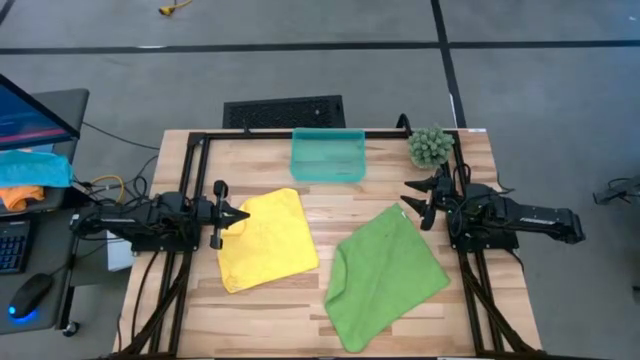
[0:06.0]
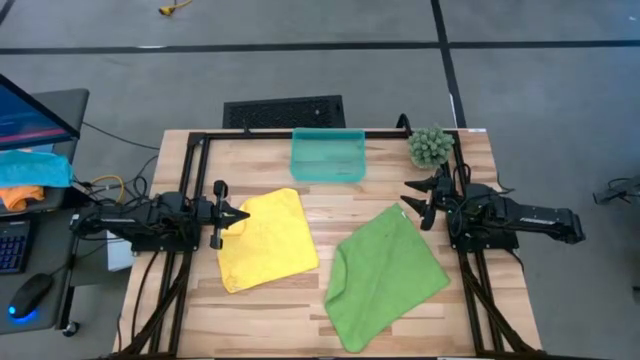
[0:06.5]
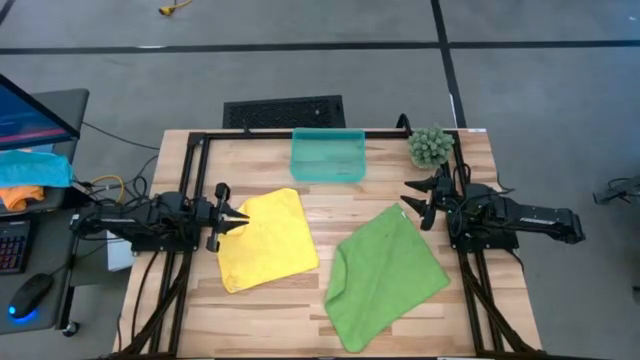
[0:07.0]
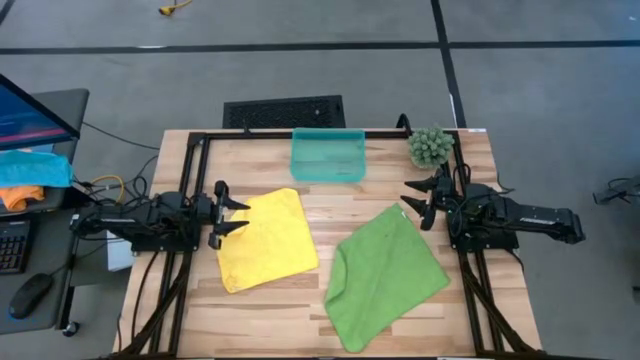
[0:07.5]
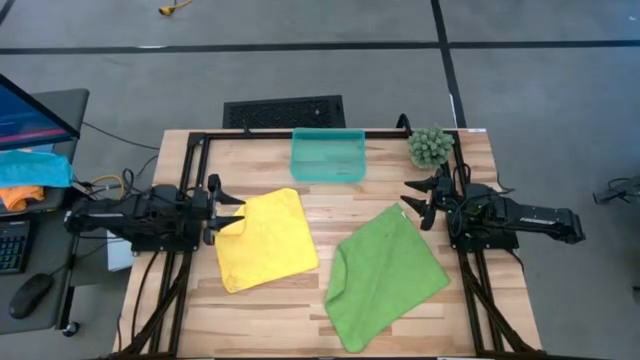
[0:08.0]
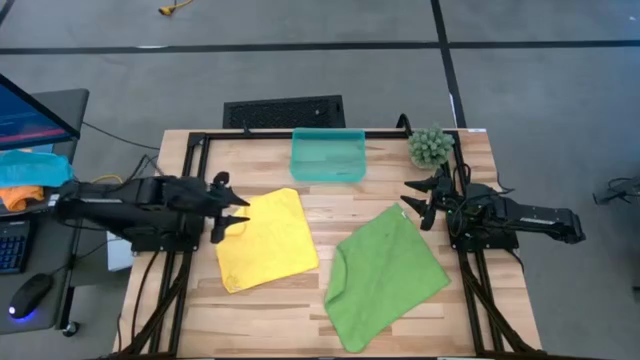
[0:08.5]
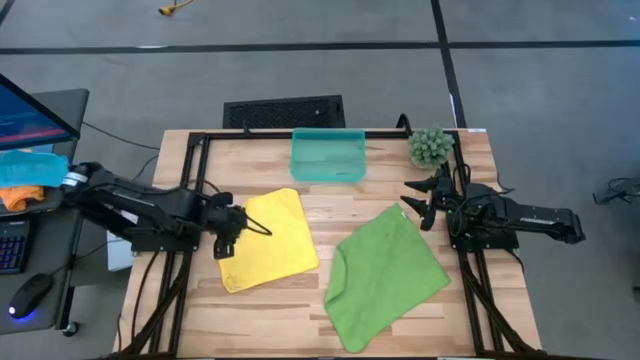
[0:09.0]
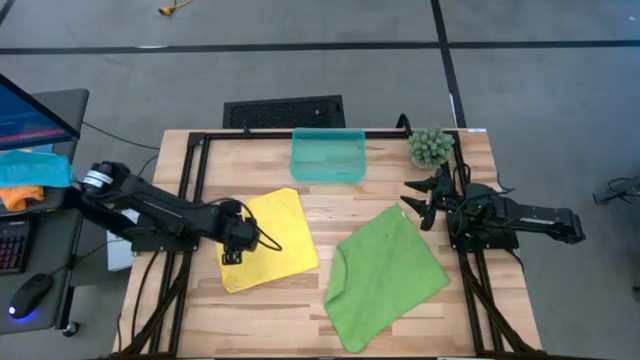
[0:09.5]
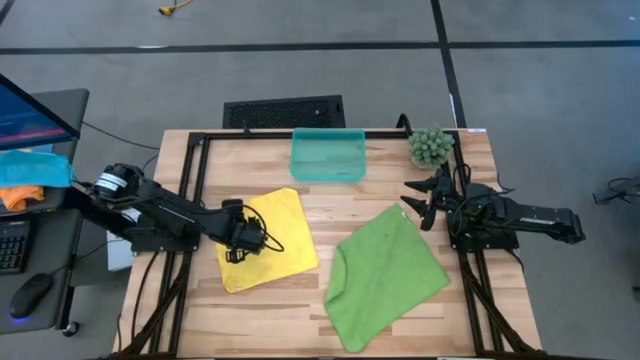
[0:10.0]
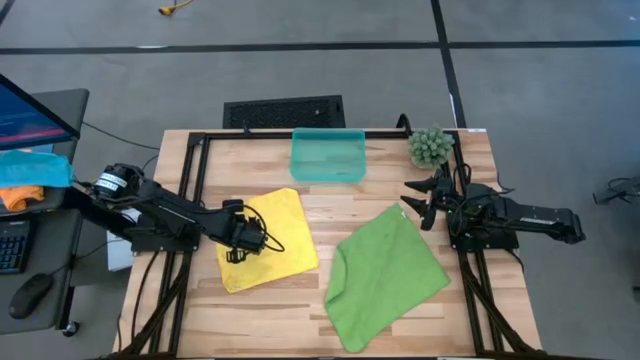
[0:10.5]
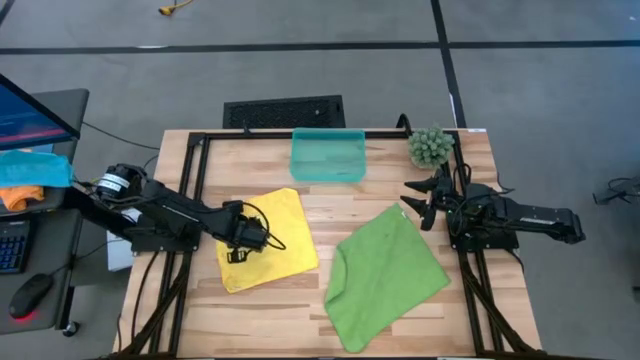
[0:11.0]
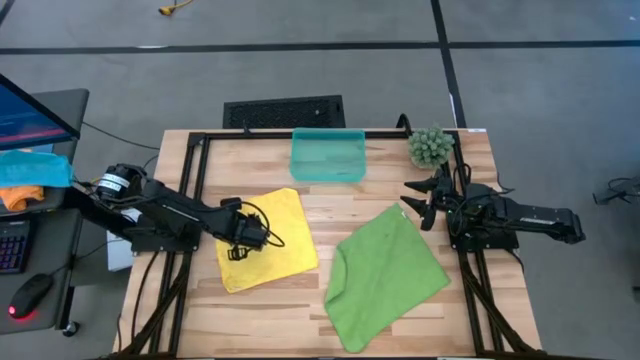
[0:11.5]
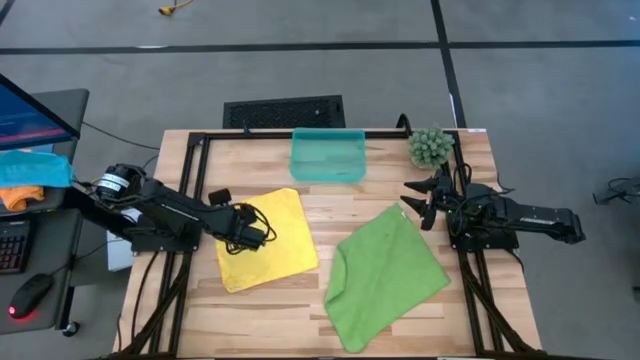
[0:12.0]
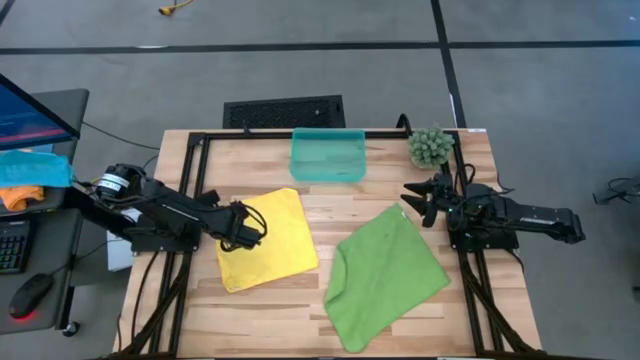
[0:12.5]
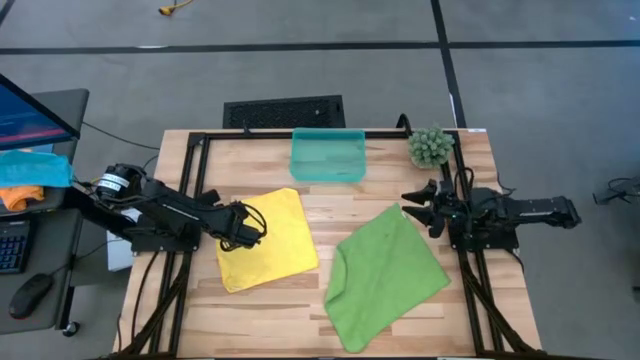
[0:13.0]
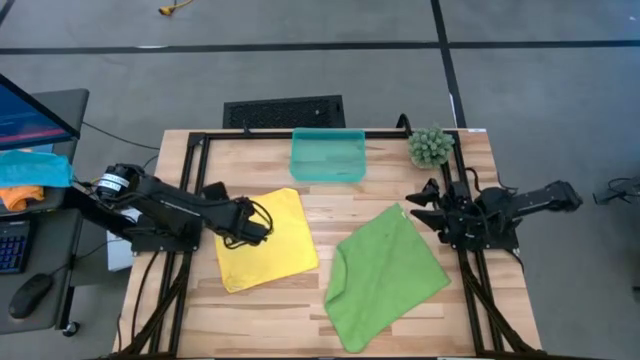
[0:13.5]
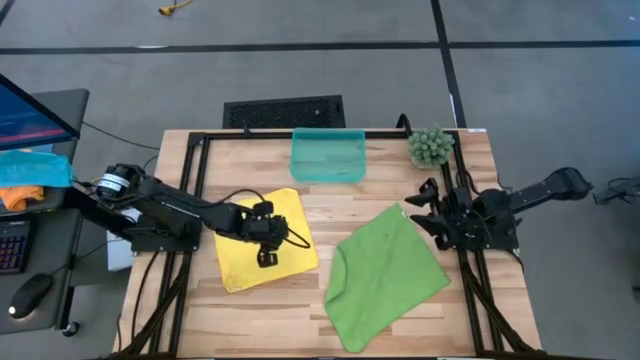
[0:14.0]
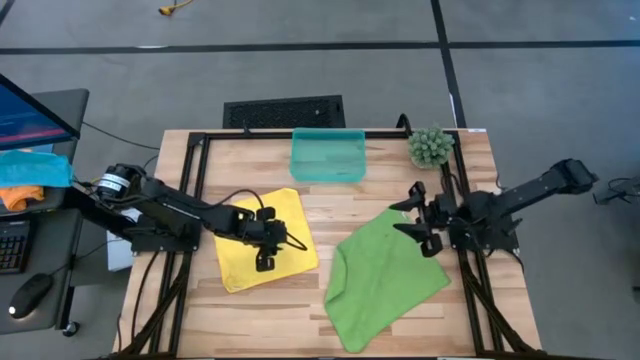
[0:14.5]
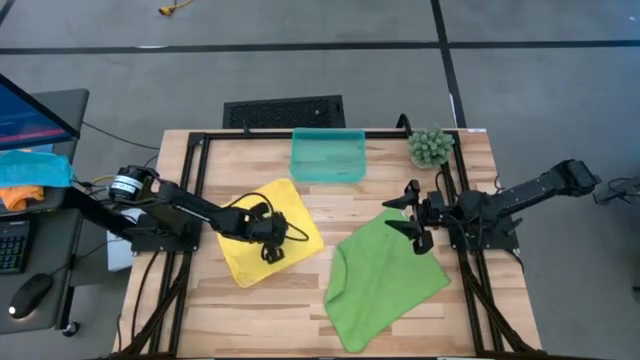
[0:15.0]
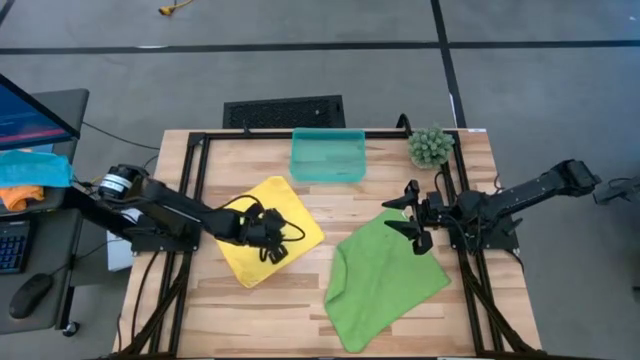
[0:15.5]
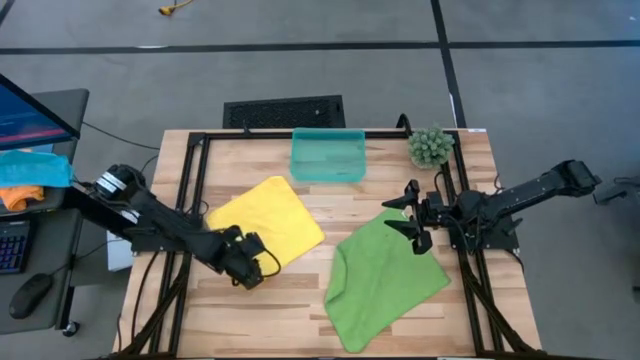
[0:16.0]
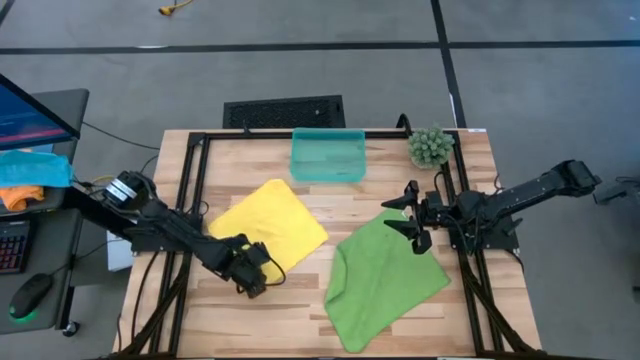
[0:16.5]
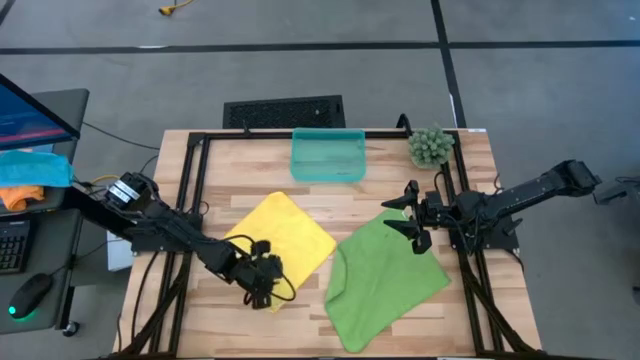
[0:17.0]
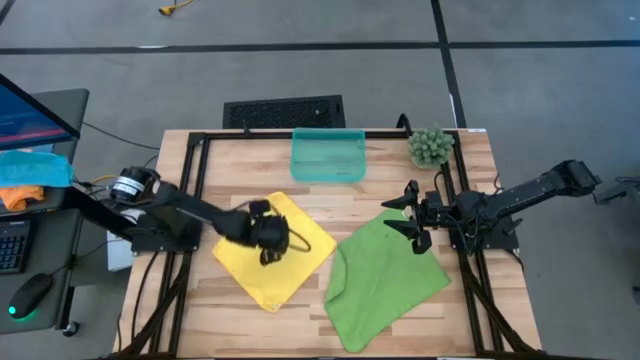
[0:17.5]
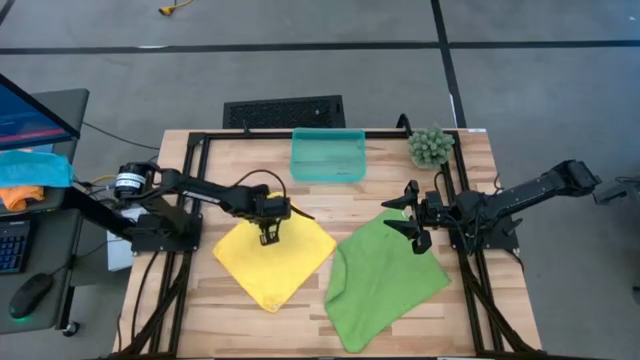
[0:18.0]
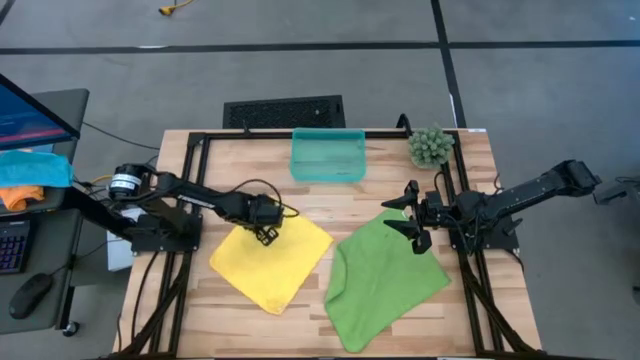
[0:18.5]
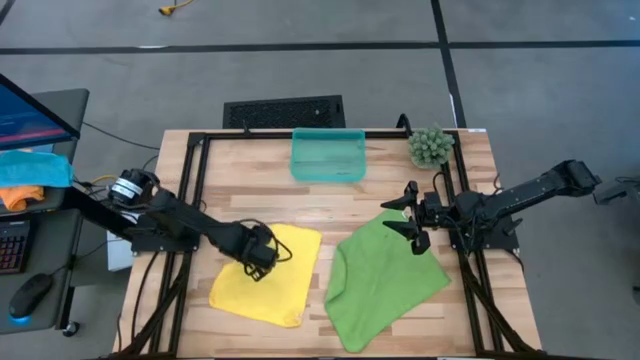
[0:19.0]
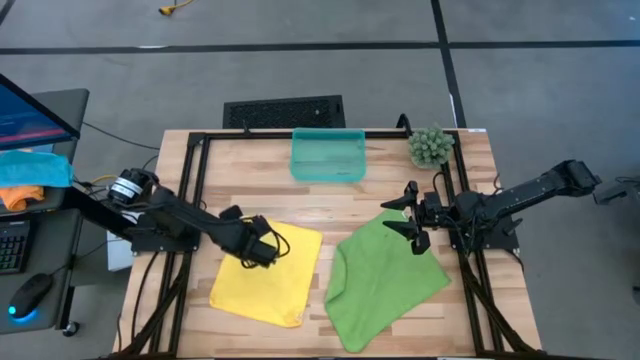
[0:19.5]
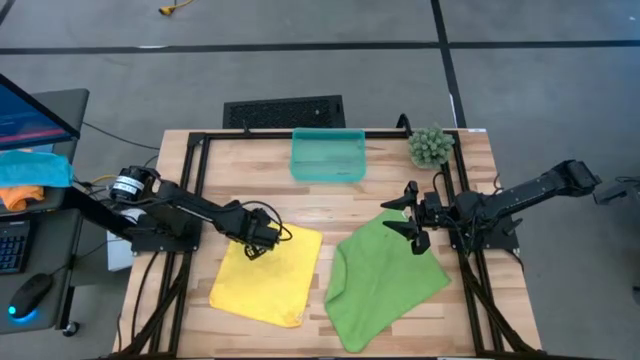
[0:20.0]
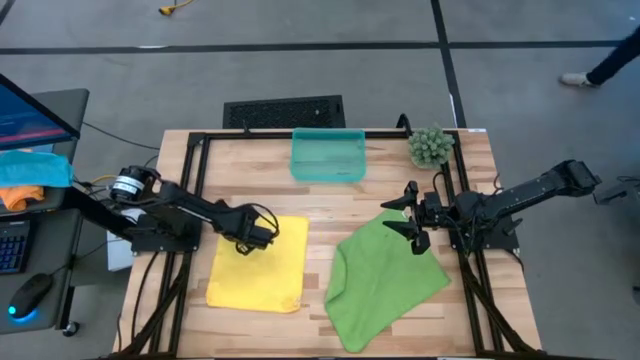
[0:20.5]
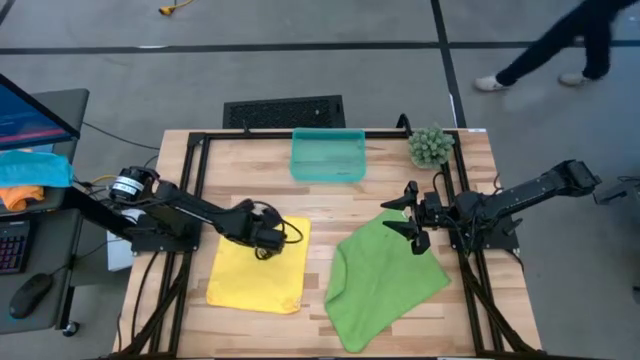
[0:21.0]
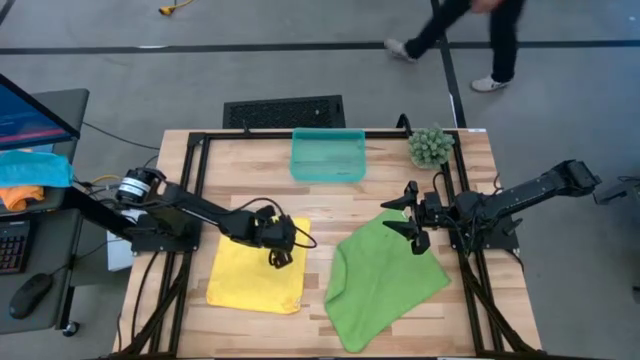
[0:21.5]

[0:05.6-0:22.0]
Task: Roll microfiber towels into tight, uniform cylinder then place into a basket
Fold the yellow microfiber towel

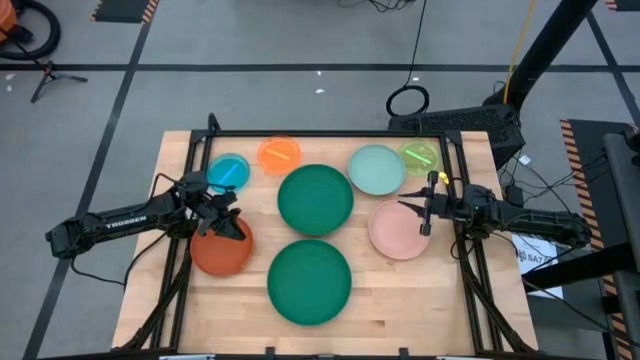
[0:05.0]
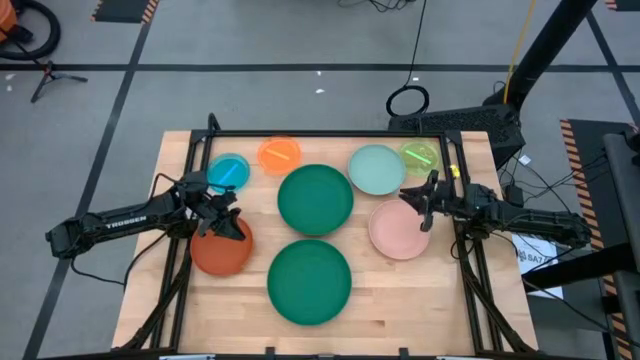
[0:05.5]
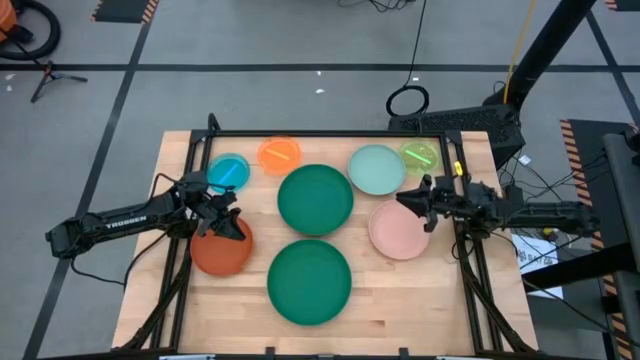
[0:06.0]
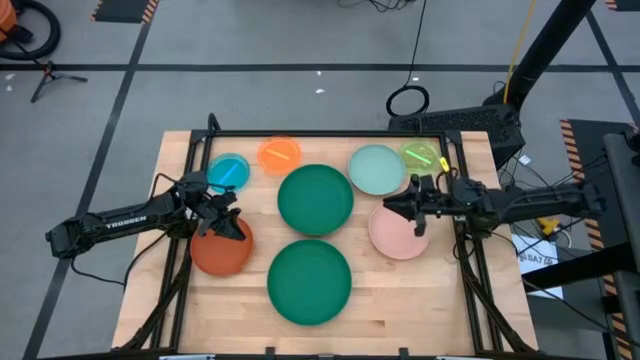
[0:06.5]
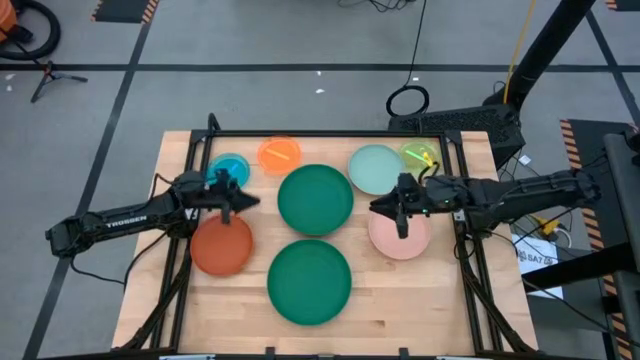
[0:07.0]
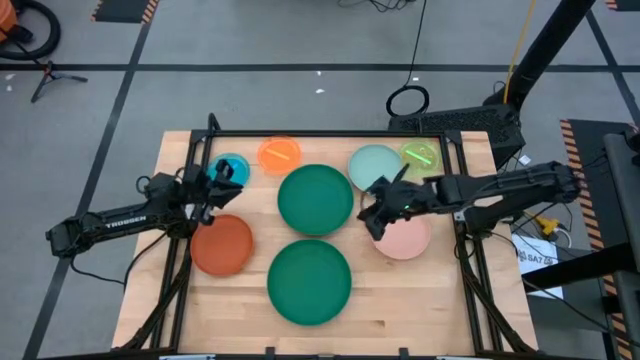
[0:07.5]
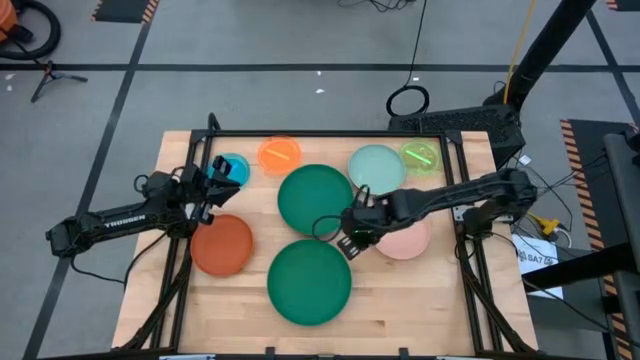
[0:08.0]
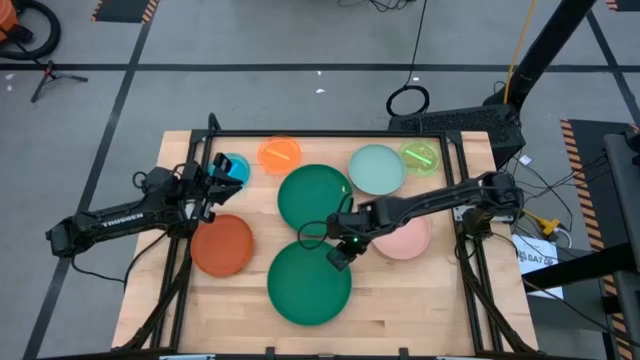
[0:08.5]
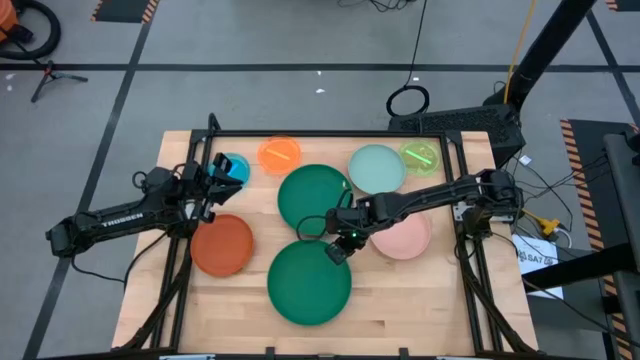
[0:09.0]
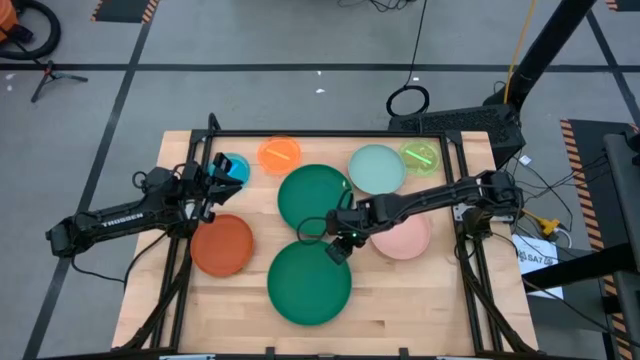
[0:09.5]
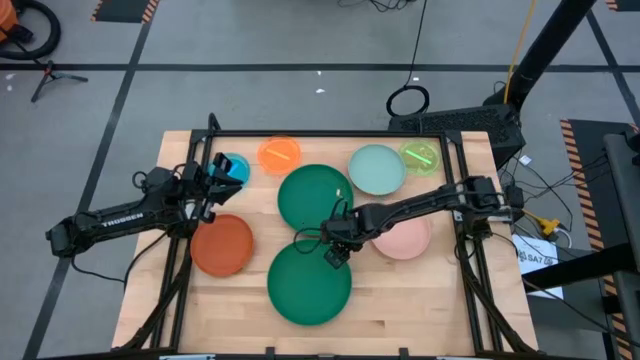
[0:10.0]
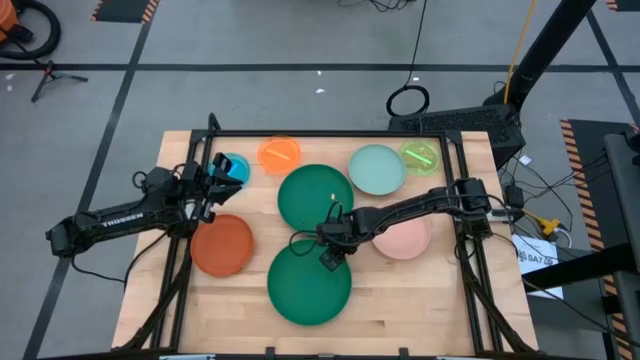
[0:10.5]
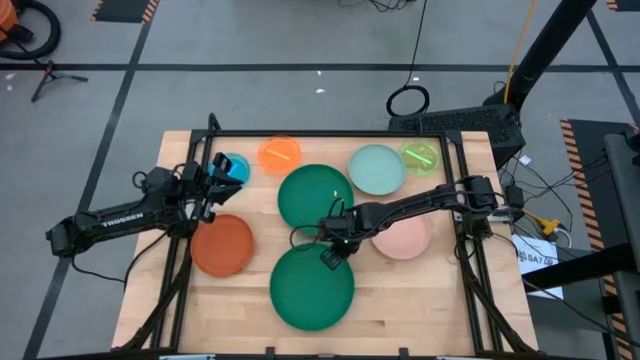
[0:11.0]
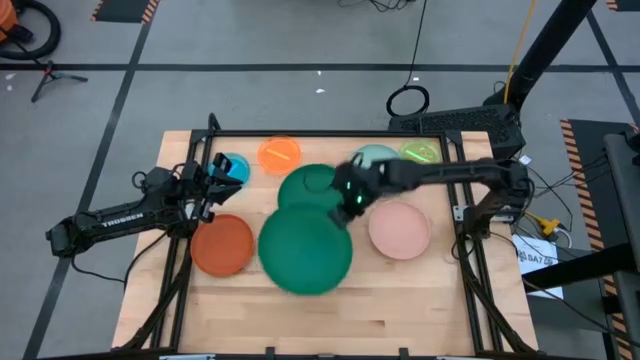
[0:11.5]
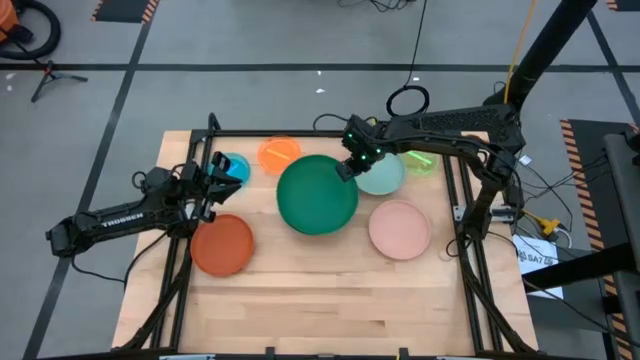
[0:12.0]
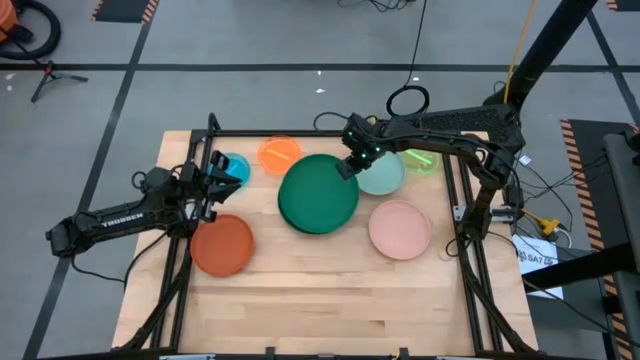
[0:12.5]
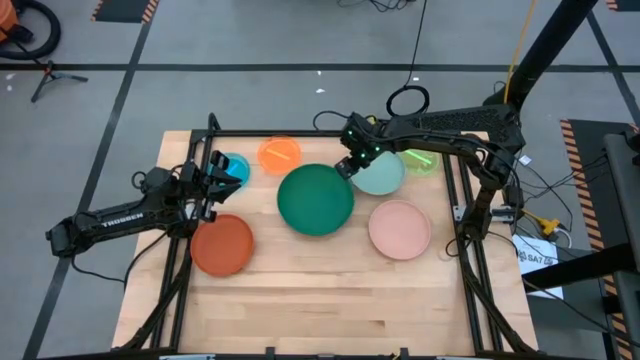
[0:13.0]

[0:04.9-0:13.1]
Task: Stack plastic plates
Stack the bottom dark green plate on top of the top dark green plate
